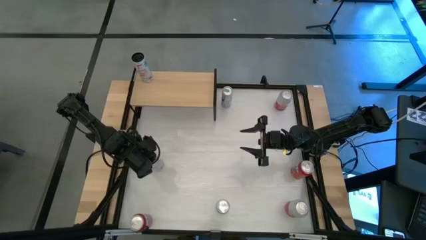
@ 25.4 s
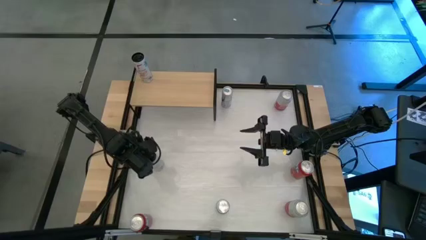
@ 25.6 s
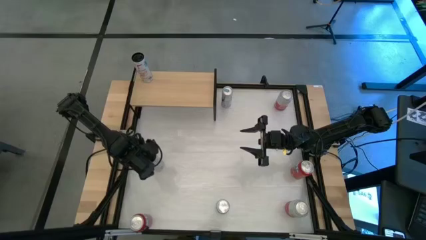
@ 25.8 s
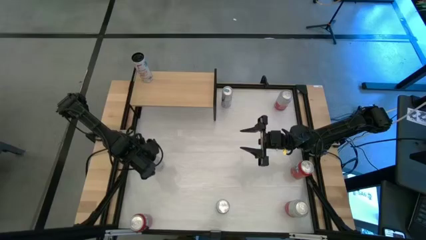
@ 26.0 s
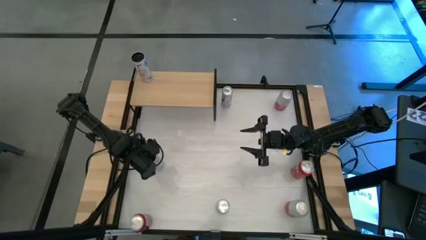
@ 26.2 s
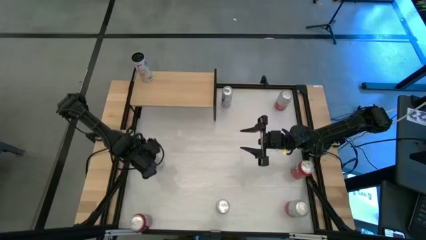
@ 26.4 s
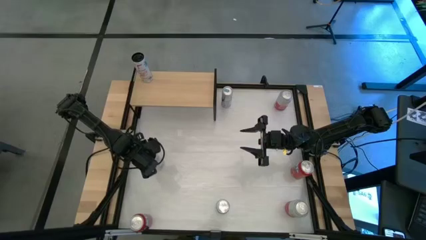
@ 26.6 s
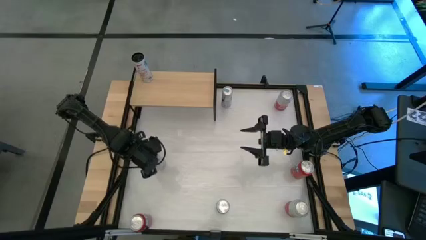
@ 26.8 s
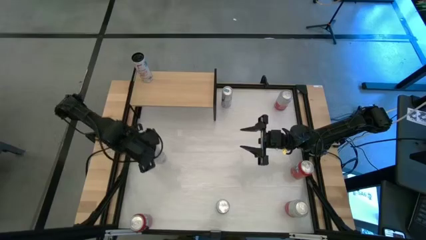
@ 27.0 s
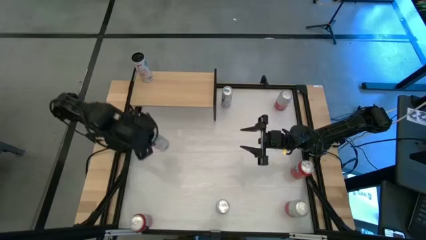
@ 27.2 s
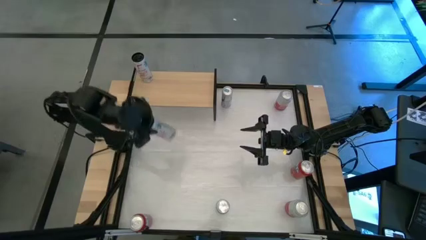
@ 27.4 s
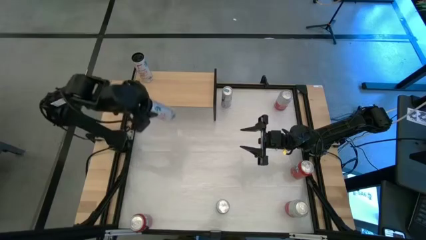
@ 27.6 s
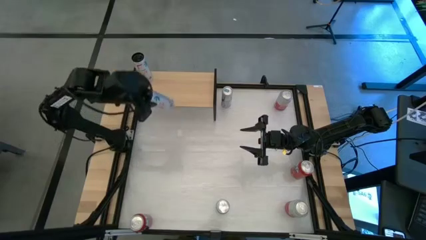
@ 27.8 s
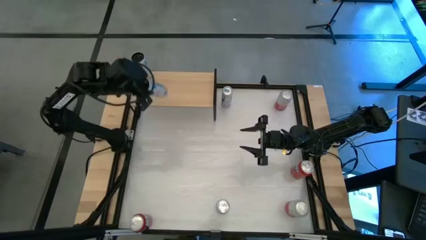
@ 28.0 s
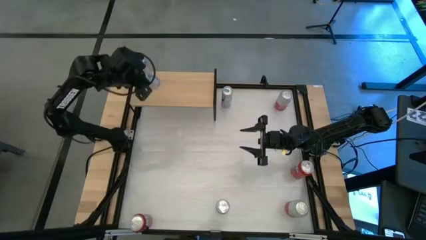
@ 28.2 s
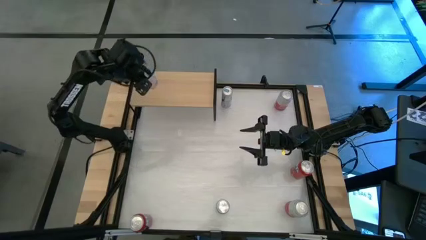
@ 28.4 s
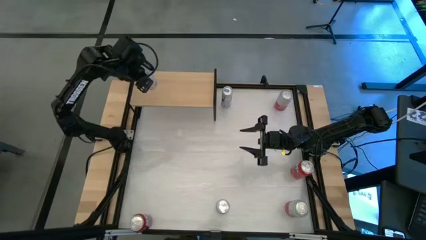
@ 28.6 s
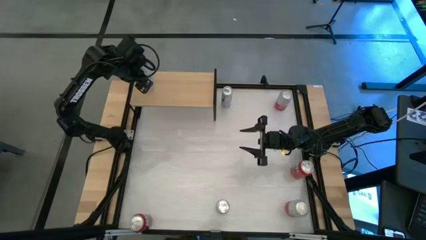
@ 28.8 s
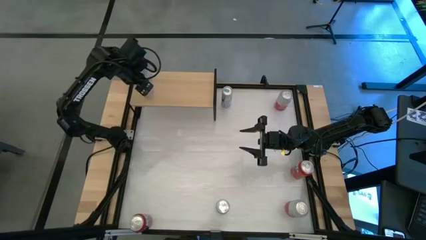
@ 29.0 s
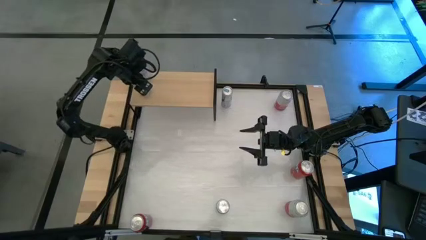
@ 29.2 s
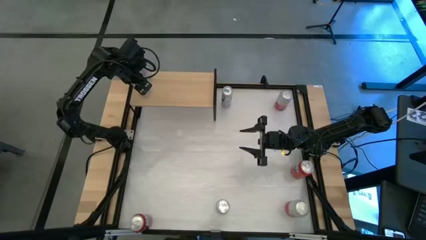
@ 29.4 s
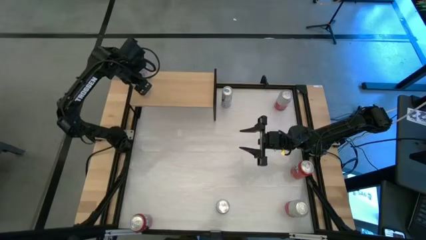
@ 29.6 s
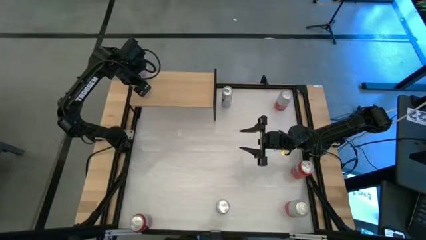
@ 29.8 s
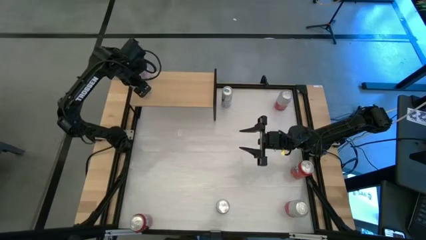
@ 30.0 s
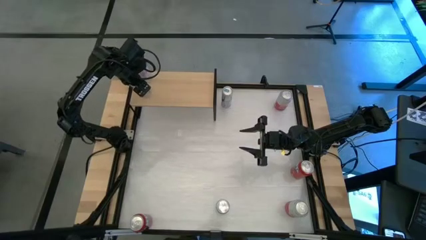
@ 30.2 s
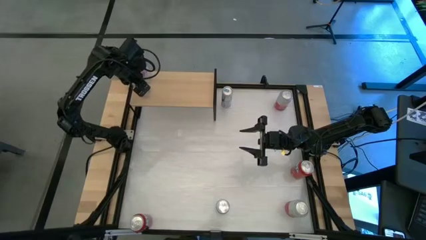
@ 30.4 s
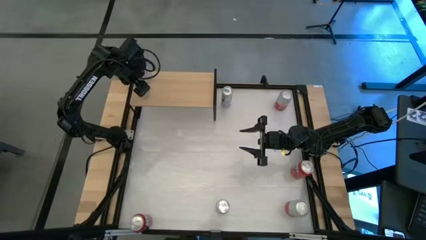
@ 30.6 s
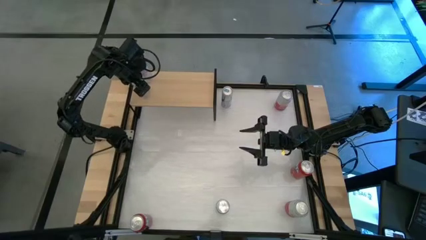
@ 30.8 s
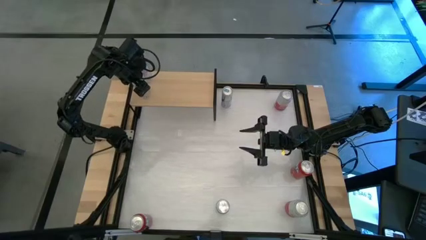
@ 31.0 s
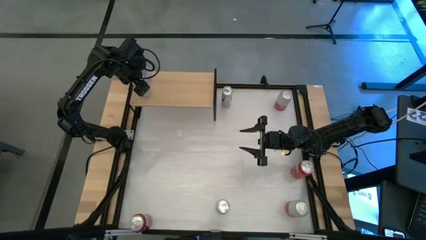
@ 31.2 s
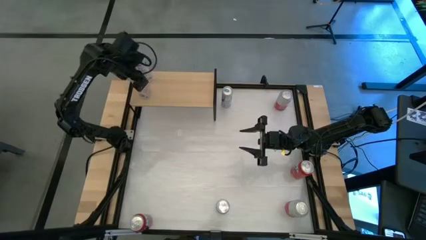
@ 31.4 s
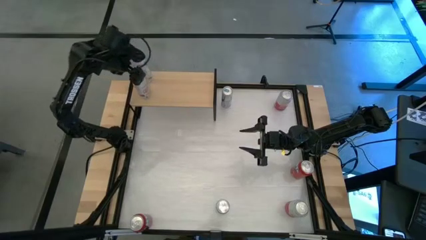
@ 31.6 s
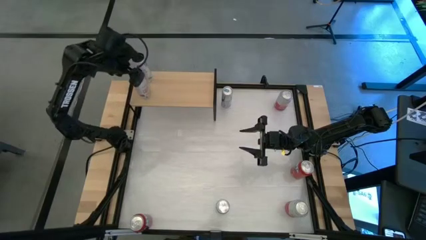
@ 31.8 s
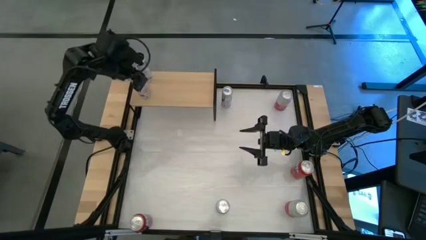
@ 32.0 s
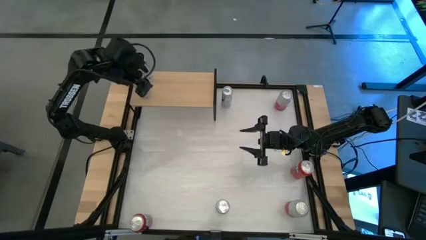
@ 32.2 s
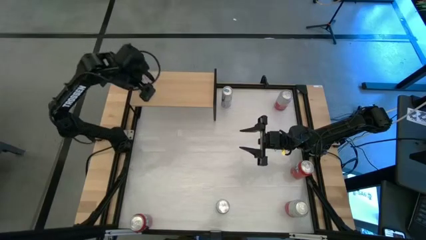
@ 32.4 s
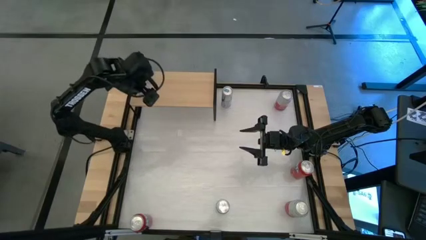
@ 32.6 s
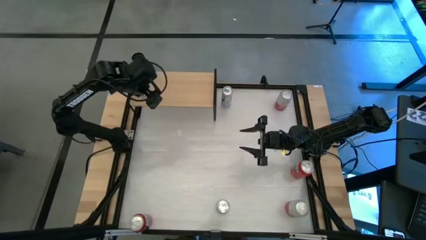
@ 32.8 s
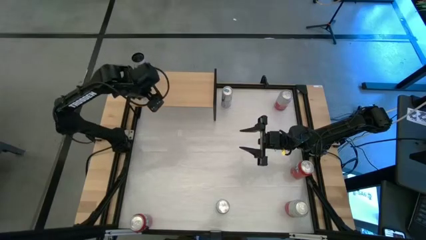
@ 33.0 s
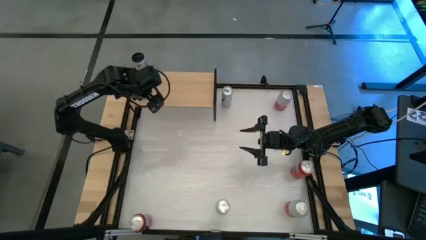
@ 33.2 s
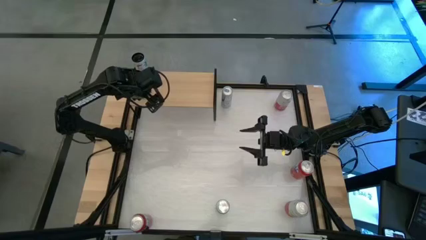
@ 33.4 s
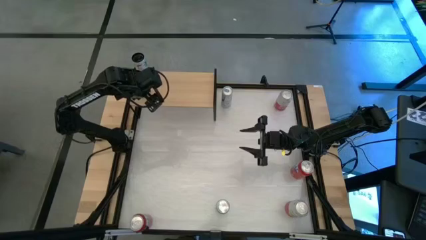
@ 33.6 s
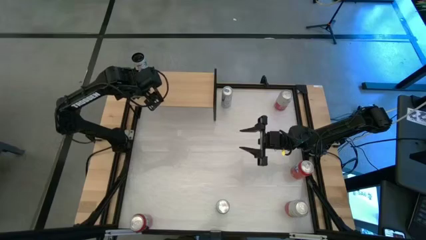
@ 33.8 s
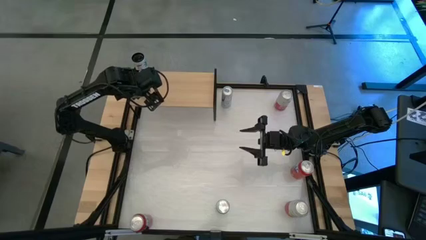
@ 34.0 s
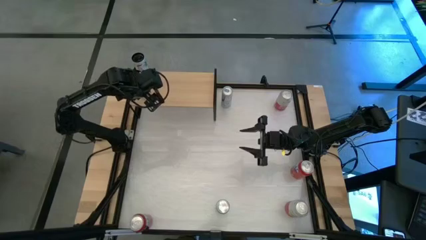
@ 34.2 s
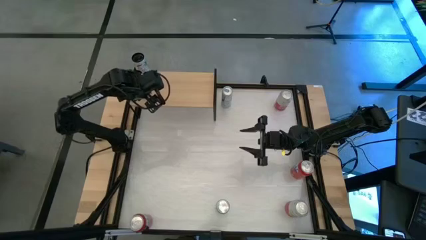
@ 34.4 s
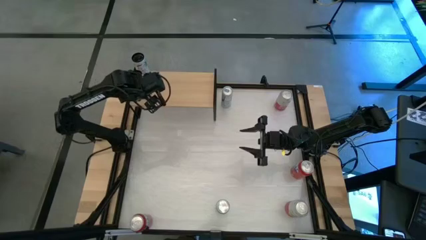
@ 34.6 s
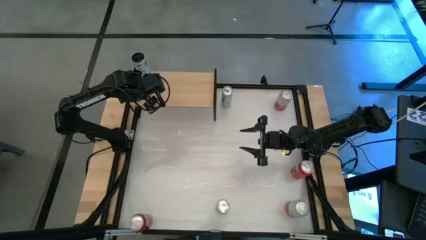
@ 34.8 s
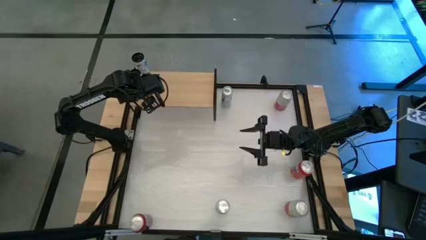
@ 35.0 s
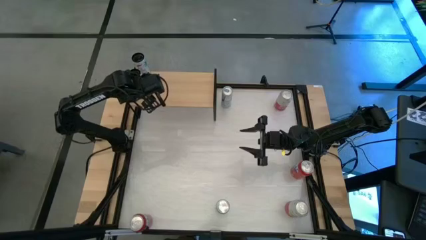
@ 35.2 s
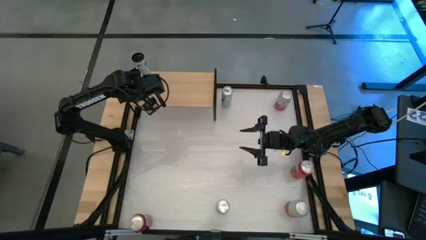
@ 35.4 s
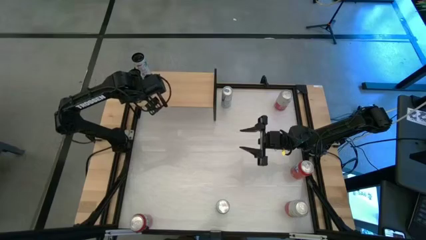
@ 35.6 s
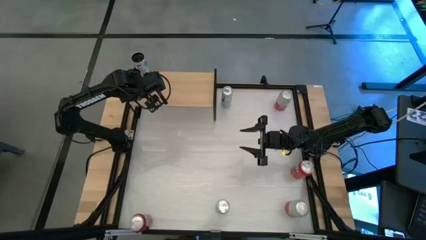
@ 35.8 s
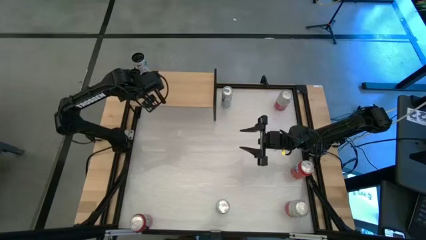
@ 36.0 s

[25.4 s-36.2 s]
Task: Place canned beverage on shelf
Put the white pink soda can on the shelf aligned with the white pink soda can

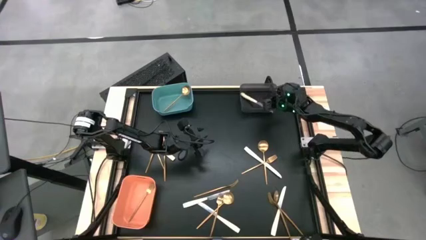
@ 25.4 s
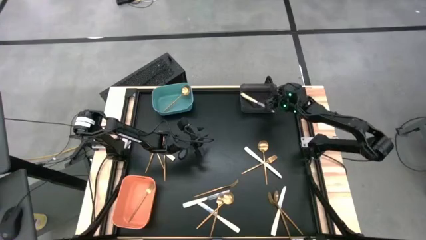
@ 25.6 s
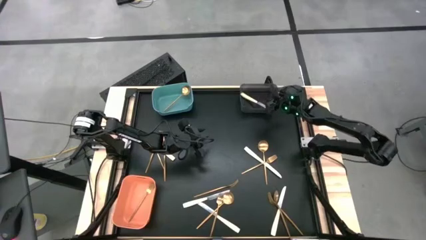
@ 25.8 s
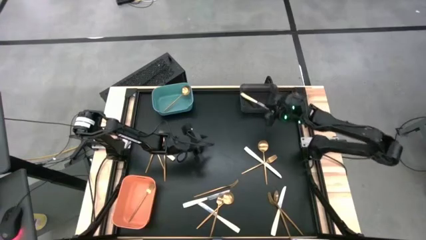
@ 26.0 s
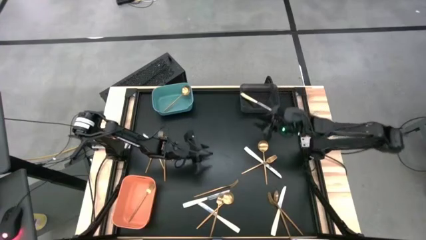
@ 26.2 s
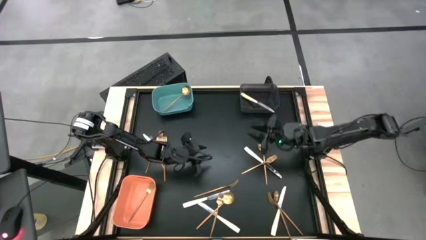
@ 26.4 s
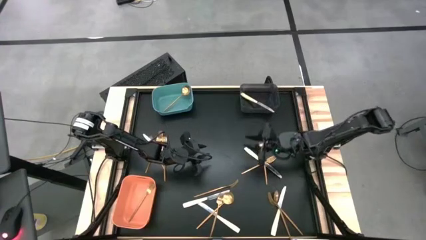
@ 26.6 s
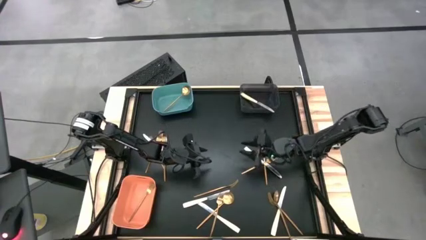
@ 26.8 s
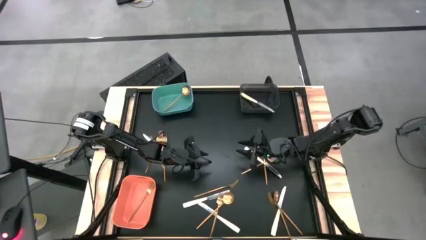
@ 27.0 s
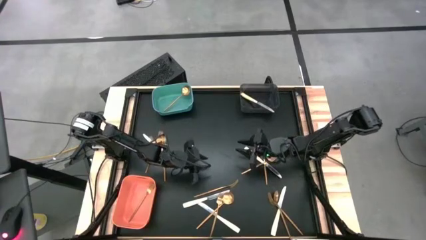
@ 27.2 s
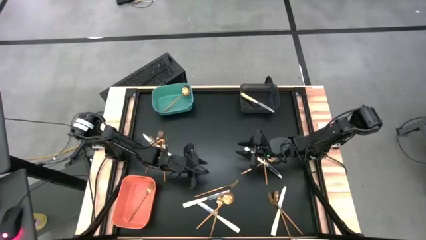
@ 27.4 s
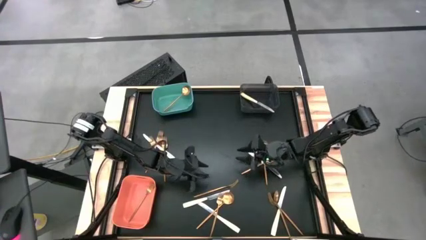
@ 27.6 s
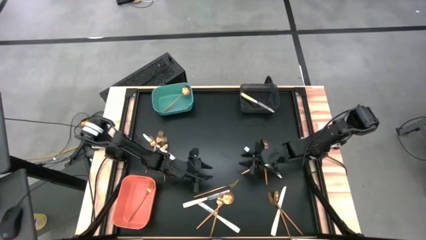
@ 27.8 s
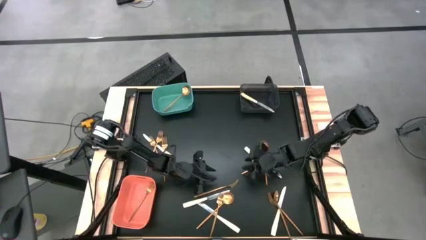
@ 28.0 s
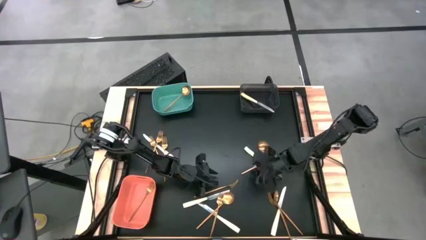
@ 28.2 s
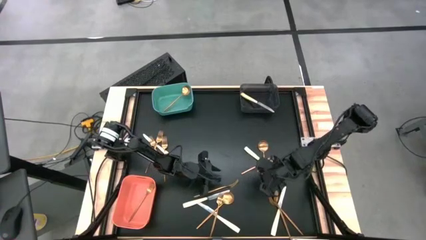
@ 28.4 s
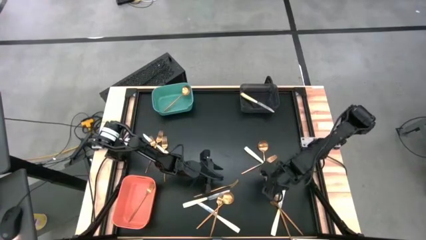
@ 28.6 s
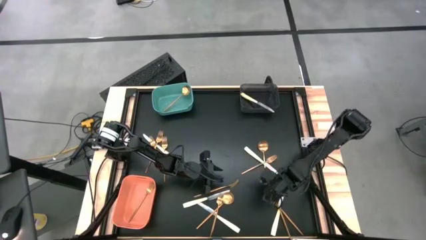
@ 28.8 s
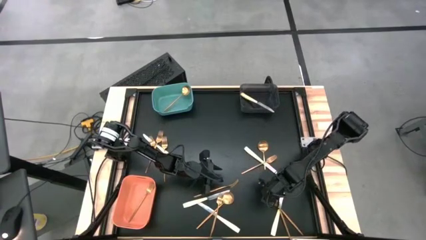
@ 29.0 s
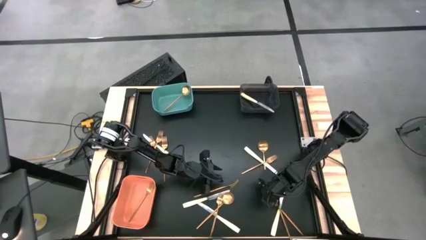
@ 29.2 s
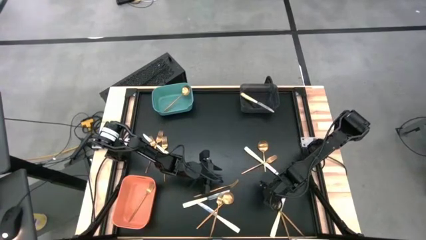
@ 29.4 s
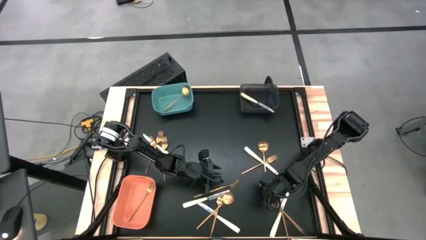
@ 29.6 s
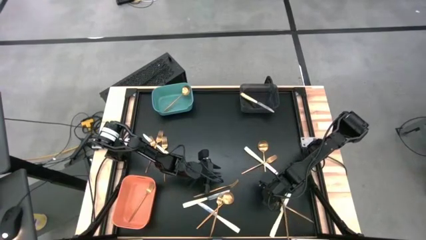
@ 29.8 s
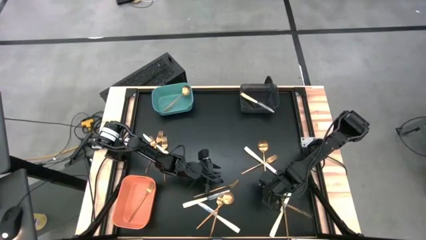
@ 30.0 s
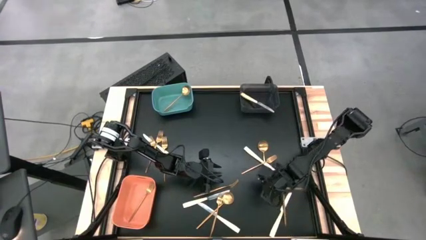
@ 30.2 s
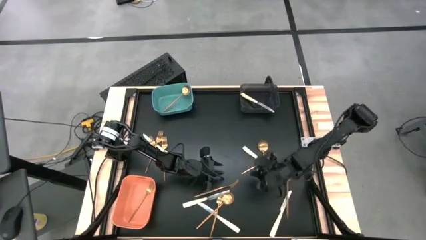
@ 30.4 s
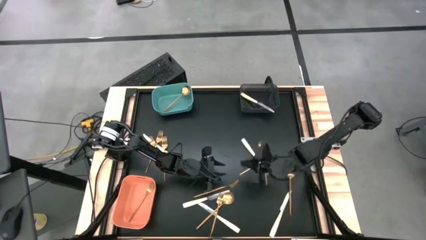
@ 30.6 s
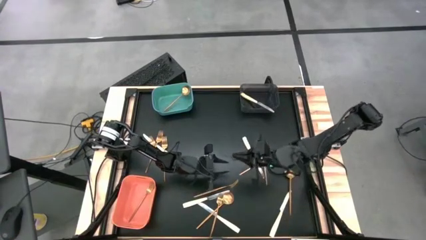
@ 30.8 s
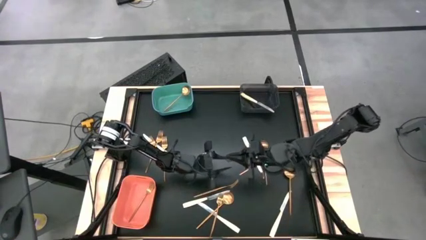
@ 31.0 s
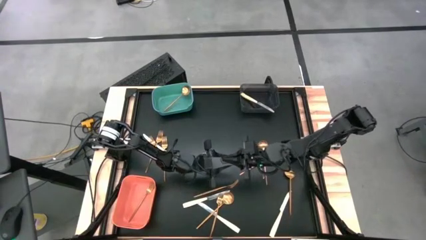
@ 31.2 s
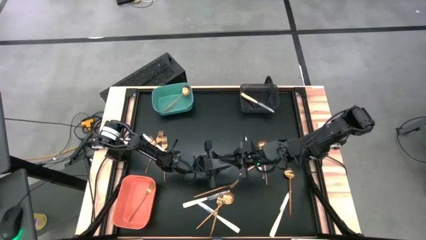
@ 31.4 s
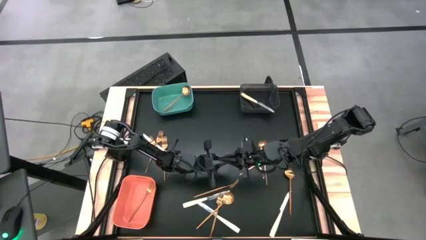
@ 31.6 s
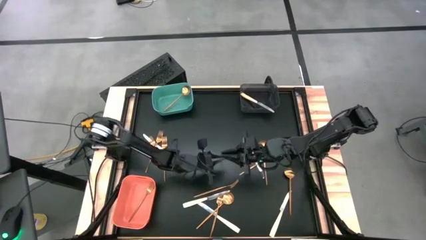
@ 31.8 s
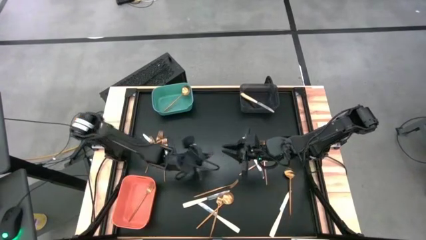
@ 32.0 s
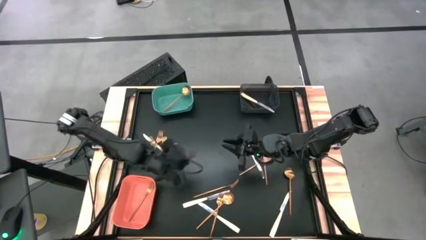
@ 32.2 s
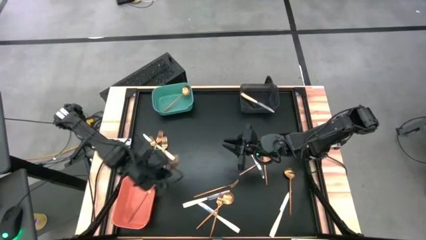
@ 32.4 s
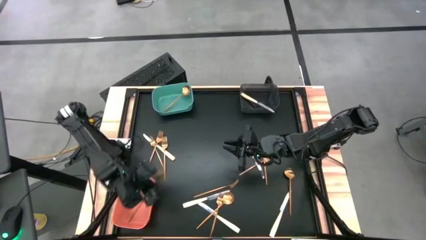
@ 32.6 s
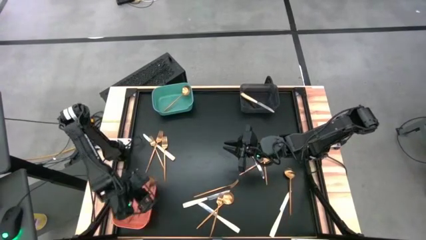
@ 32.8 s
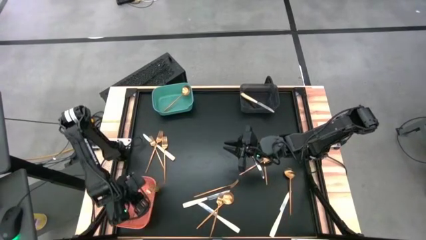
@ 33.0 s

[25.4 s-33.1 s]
Task: Sort silverware by color (type)
Put the gold fork into the orange bin
